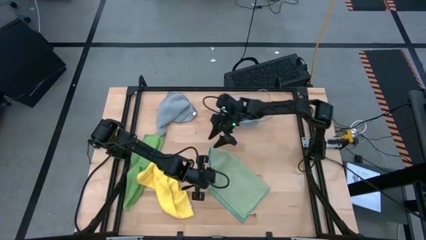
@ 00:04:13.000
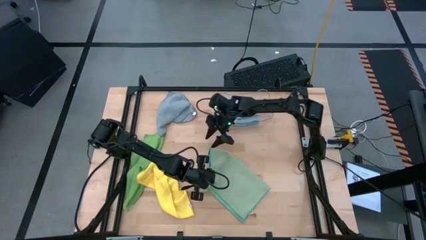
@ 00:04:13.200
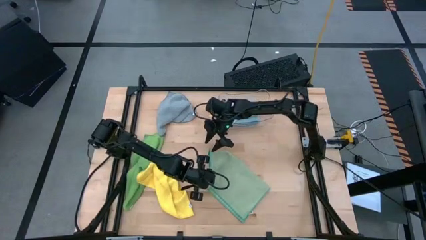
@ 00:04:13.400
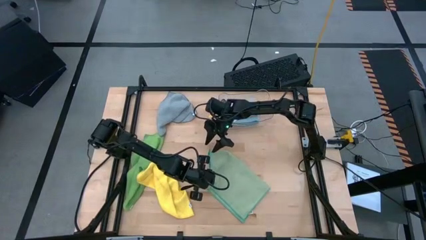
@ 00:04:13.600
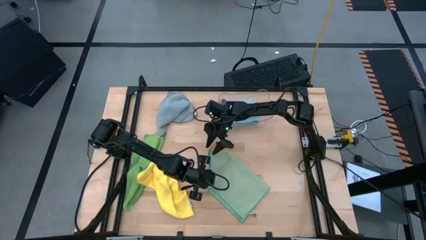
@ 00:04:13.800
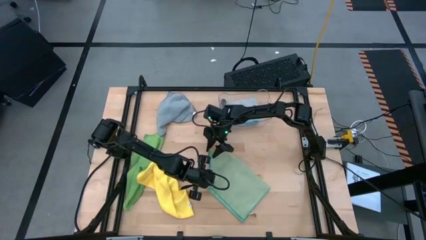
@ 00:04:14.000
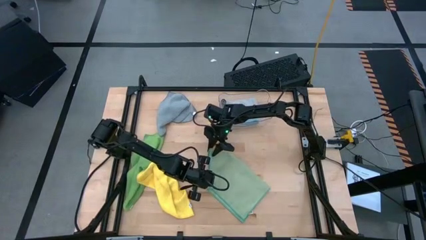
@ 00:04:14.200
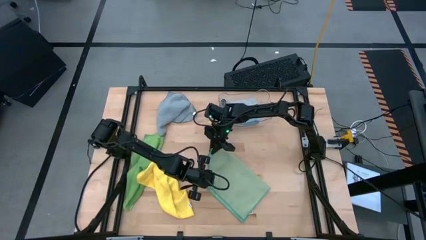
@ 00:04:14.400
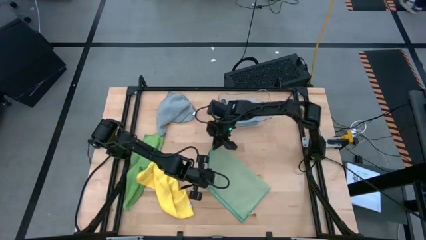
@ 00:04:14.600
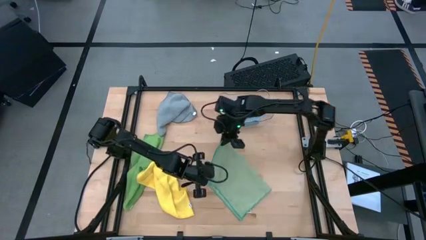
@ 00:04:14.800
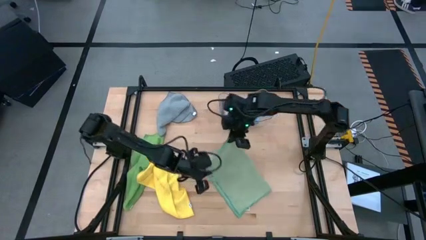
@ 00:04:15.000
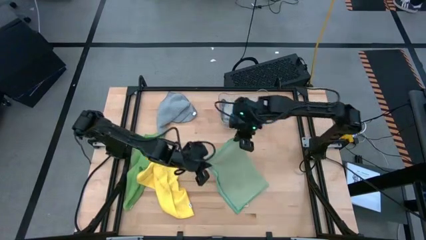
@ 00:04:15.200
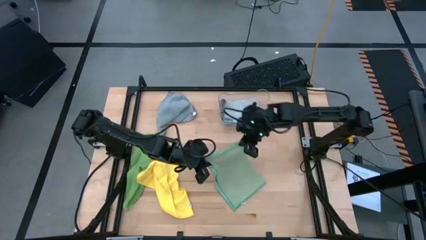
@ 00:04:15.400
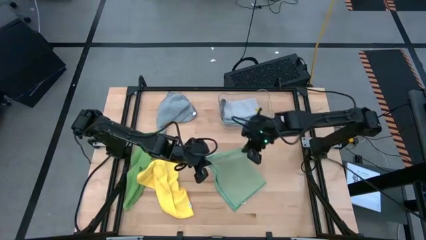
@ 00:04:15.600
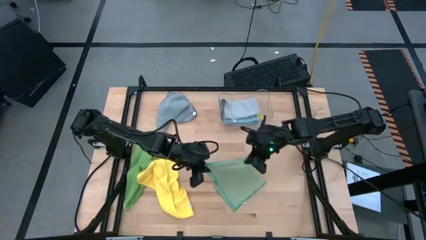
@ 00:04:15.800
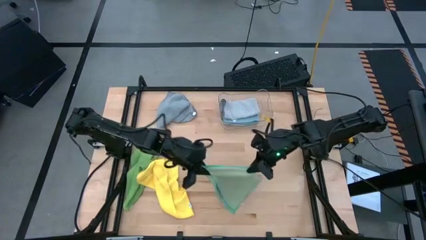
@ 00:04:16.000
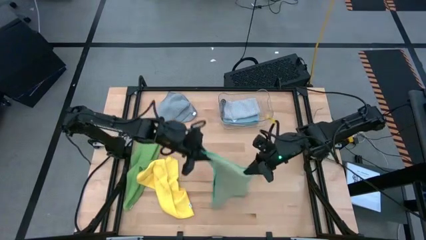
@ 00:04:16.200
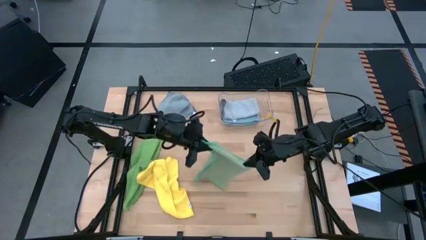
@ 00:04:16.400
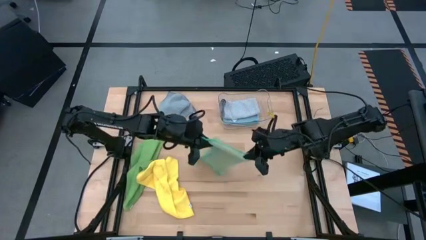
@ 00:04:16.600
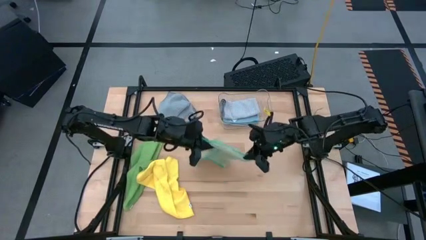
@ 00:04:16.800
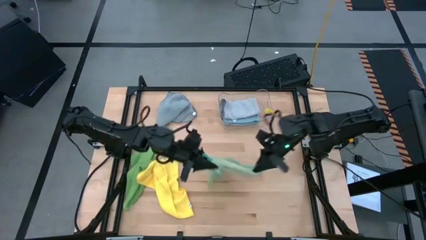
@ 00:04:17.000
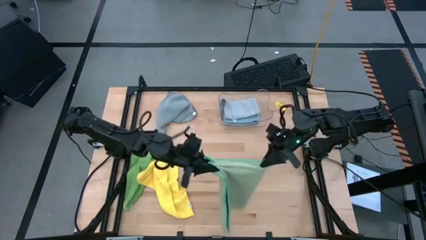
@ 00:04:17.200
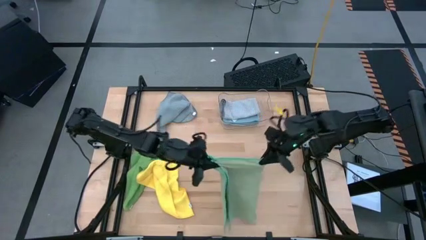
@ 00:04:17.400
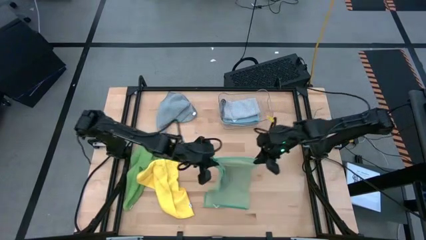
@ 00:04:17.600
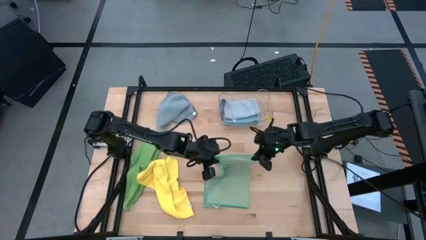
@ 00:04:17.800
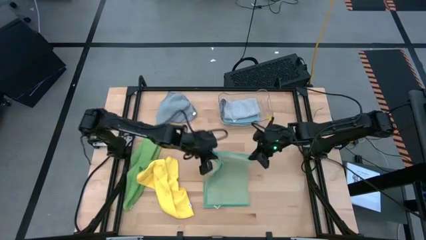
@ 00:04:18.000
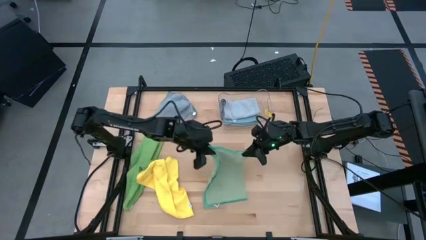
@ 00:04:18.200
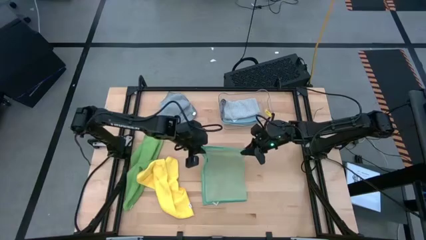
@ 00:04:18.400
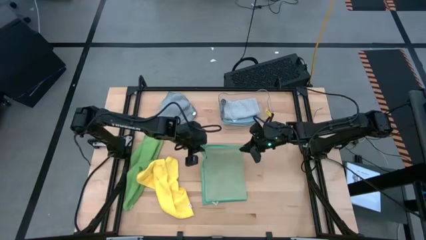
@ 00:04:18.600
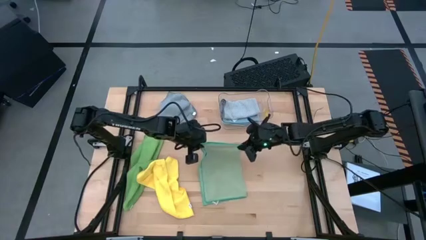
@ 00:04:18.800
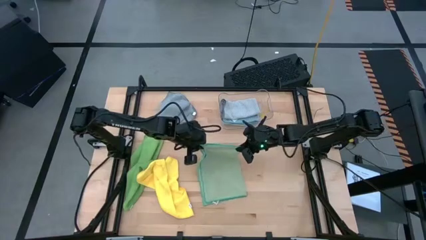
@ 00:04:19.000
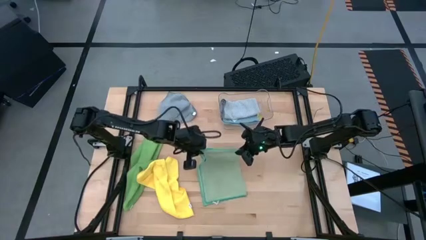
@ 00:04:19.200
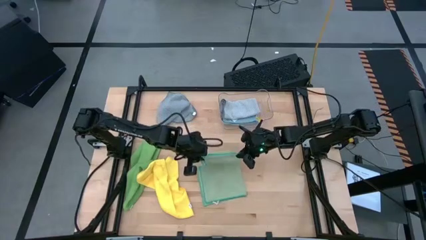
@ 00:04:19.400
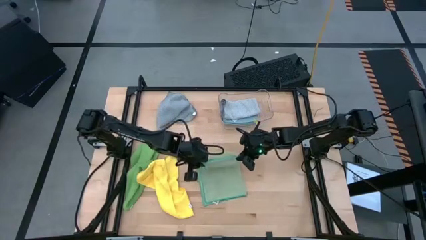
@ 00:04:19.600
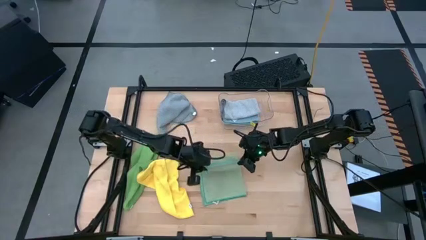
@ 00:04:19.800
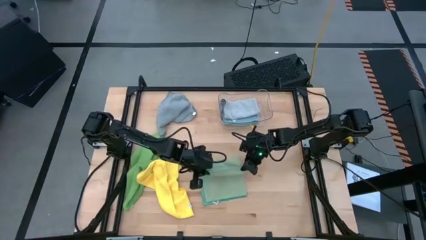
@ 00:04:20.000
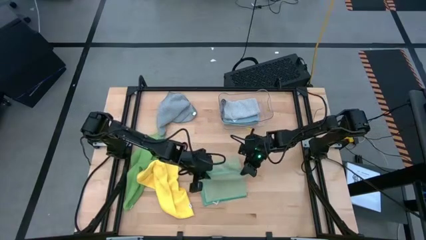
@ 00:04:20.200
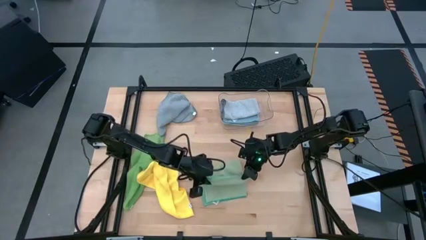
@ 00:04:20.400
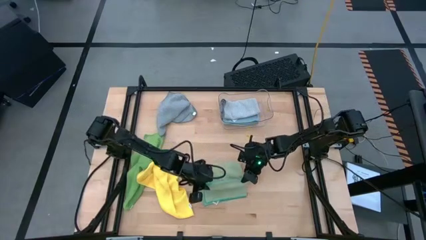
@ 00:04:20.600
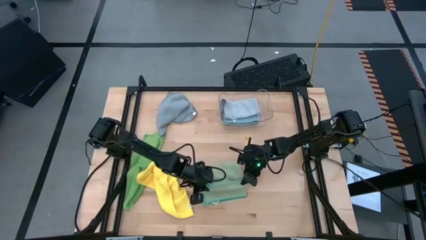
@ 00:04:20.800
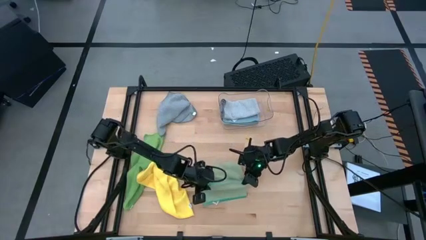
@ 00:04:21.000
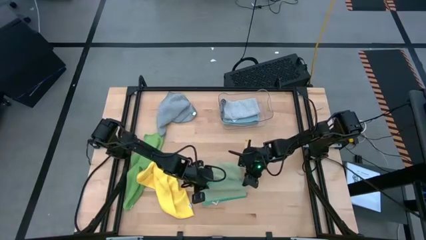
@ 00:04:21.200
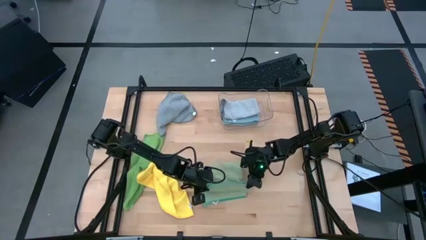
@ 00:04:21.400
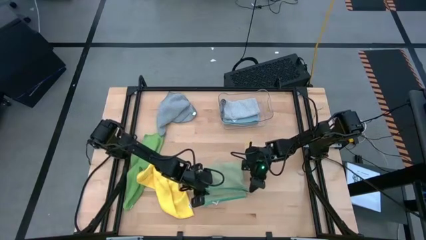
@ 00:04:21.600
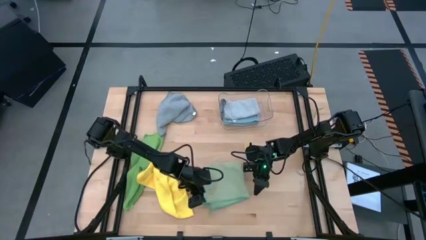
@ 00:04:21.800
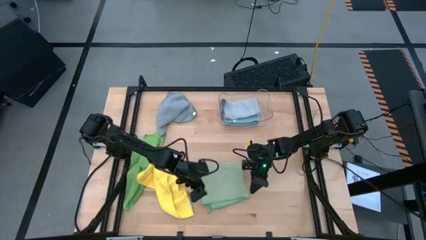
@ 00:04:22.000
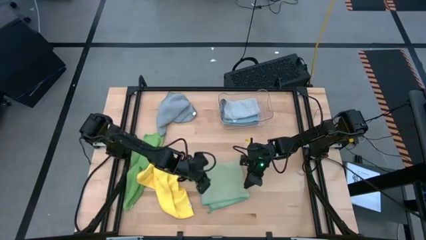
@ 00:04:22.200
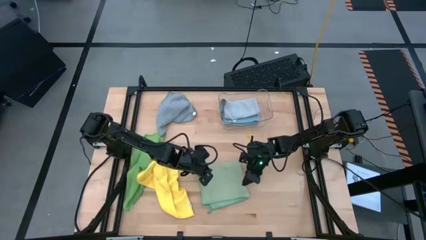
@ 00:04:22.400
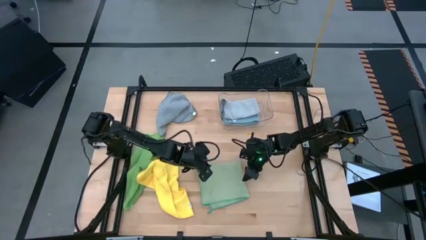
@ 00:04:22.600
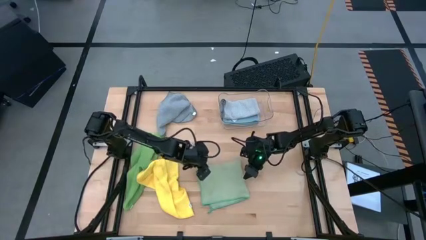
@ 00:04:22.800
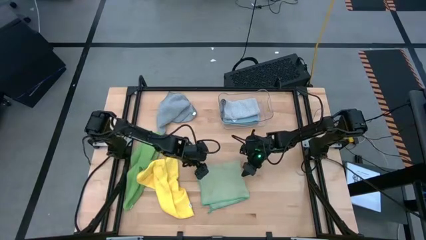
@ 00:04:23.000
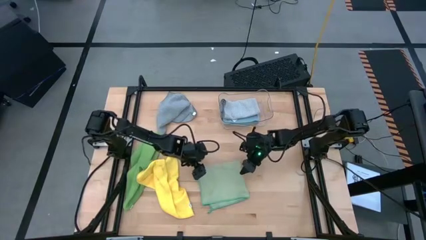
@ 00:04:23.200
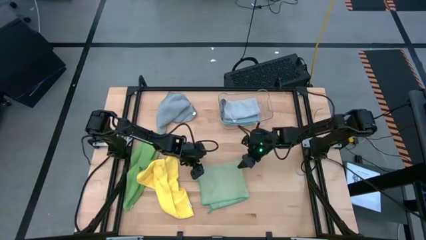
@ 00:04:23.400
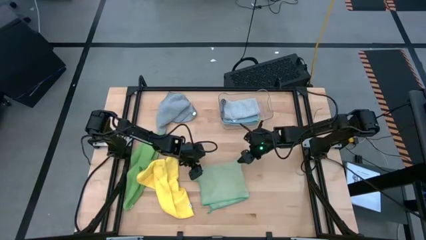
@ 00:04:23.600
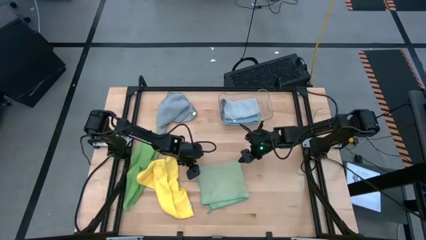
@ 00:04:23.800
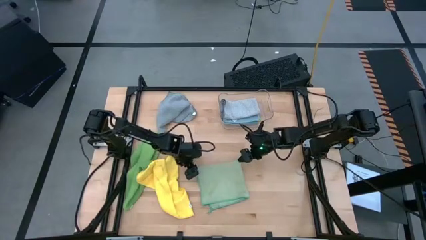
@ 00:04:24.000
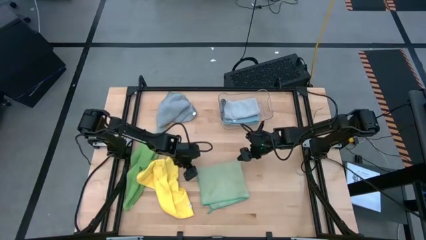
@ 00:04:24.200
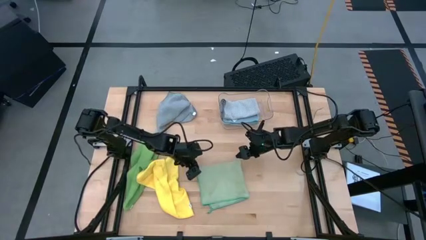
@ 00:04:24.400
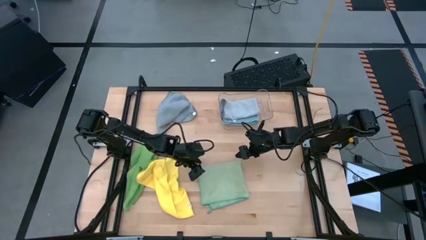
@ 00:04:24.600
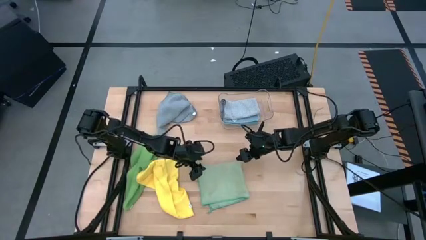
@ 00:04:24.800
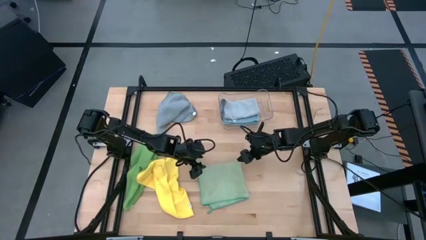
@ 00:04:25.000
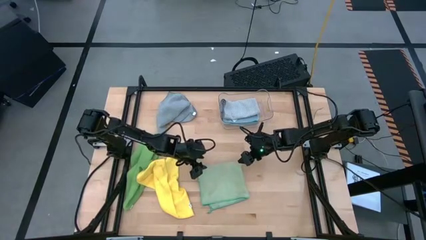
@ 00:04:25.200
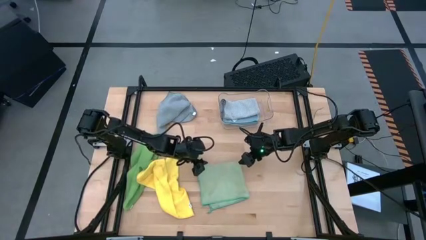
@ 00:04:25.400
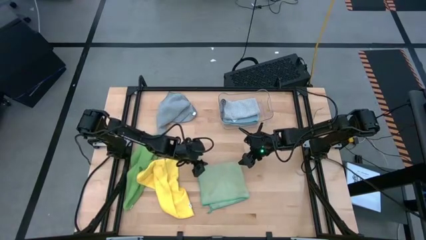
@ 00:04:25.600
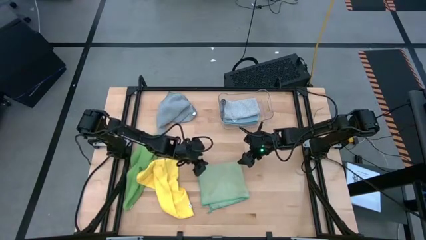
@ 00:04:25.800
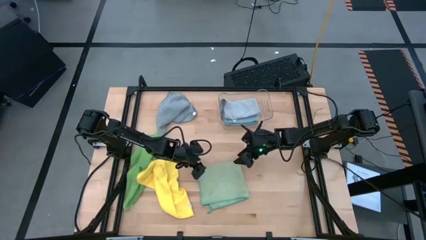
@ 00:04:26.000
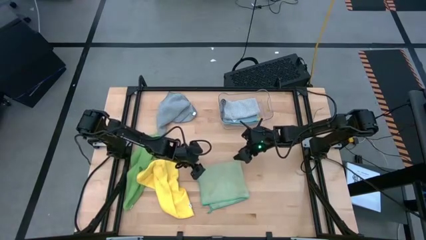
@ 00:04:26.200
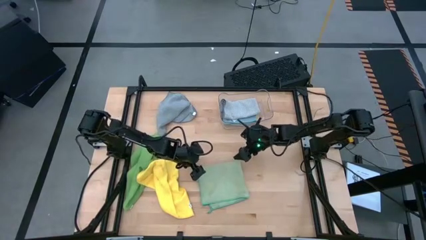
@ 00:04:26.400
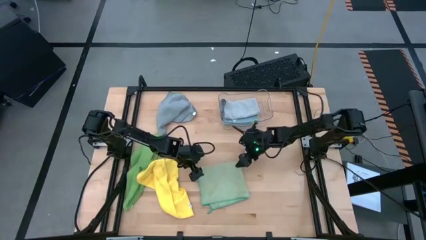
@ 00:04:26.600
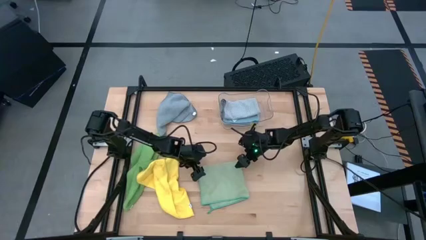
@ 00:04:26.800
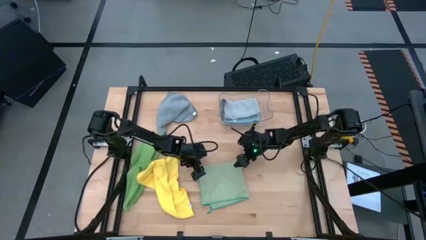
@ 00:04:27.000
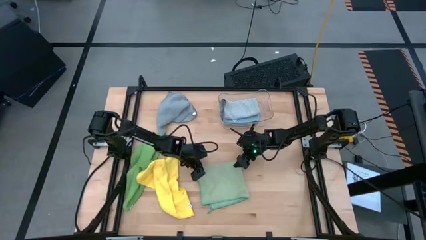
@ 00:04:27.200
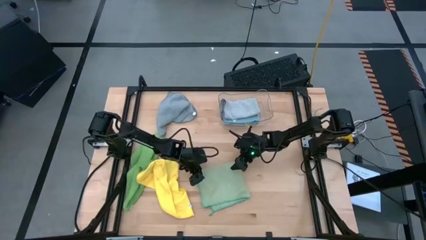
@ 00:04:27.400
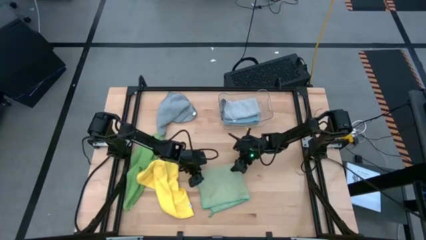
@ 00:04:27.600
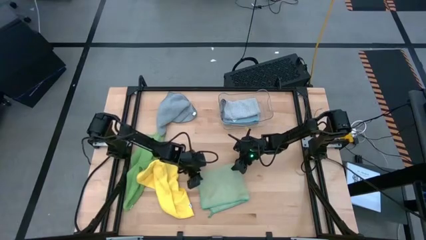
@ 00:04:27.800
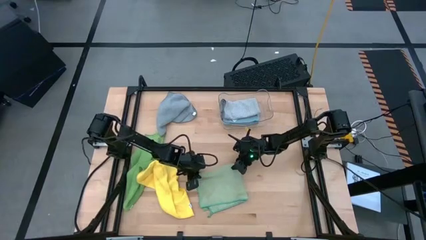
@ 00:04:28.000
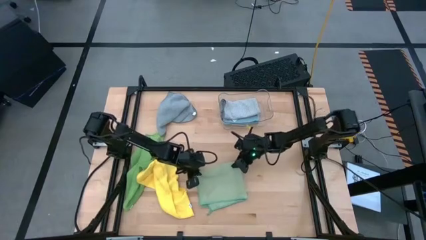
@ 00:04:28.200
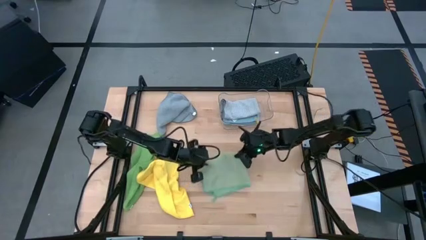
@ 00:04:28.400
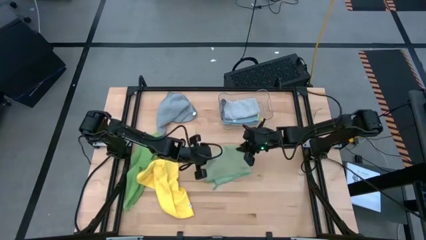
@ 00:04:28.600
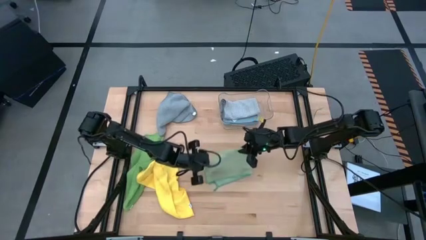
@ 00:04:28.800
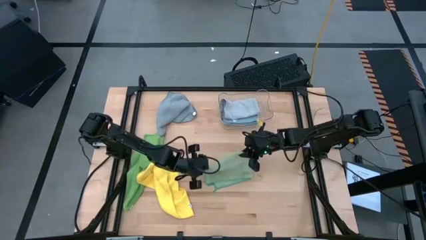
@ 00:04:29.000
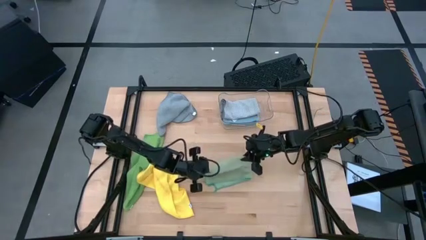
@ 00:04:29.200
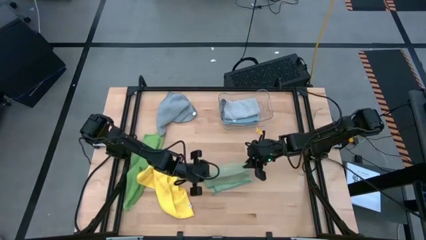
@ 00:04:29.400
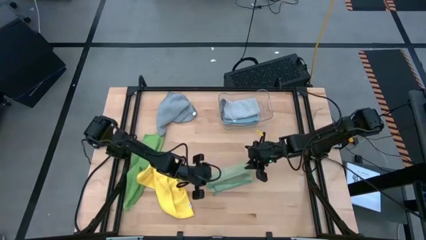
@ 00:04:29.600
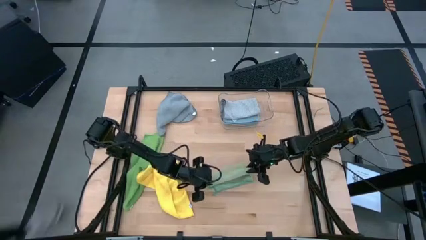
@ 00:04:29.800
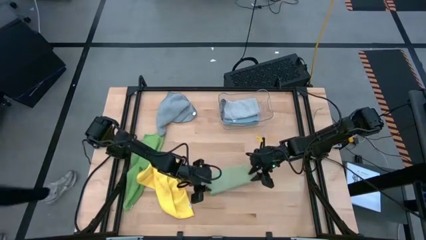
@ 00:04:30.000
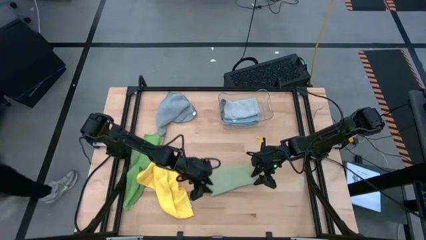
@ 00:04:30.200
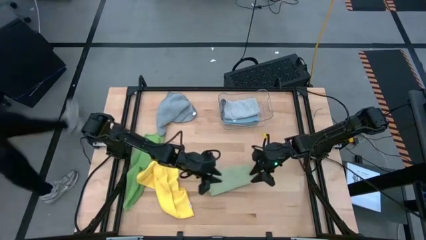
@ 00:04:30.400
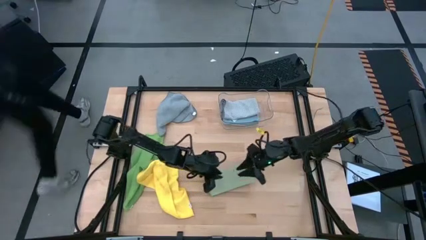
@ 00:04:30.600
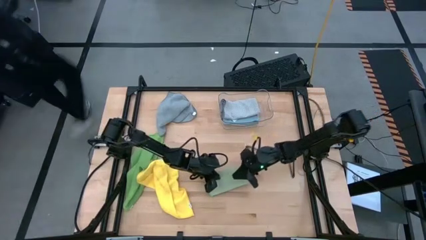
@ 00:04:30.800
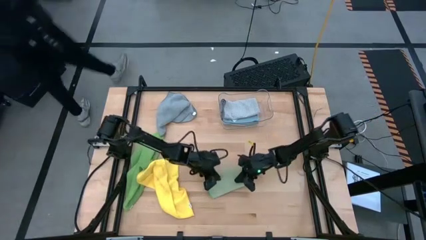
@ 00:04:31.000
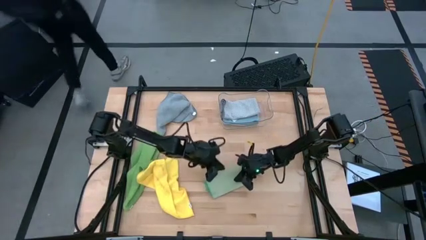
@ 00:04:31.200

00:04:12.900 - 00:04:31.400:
Task: Fold microfiber towels
Fold the light green towel
